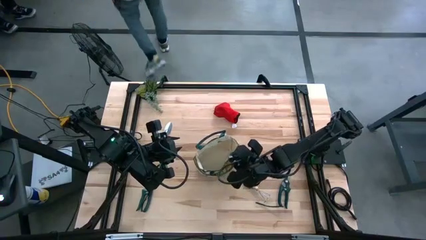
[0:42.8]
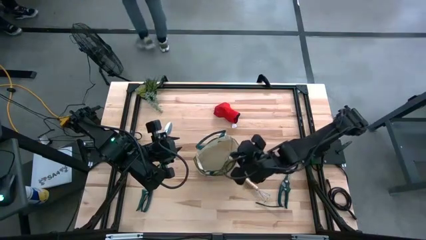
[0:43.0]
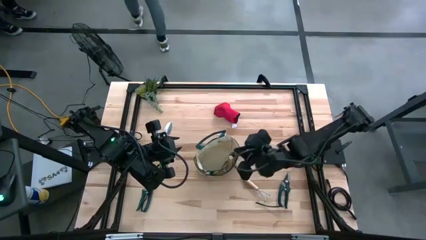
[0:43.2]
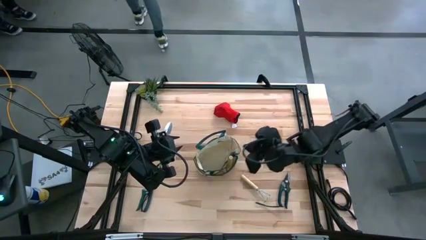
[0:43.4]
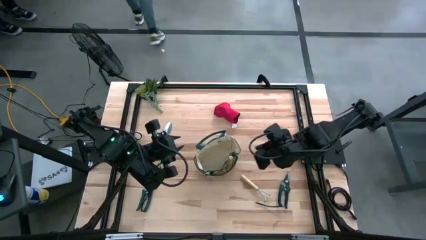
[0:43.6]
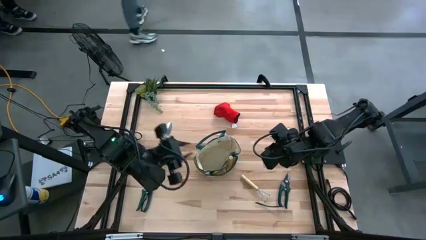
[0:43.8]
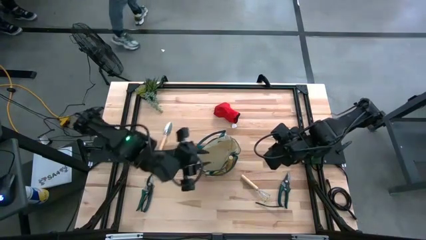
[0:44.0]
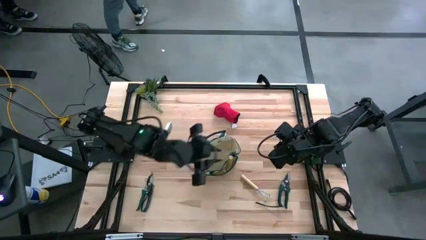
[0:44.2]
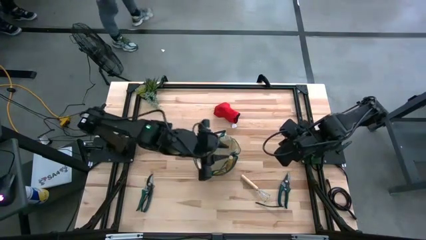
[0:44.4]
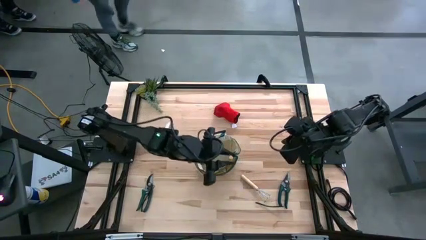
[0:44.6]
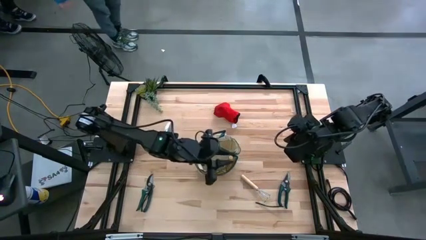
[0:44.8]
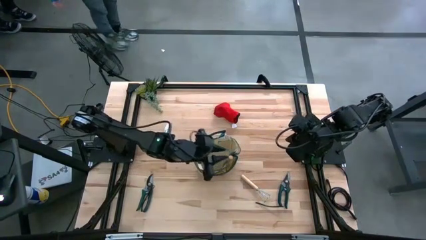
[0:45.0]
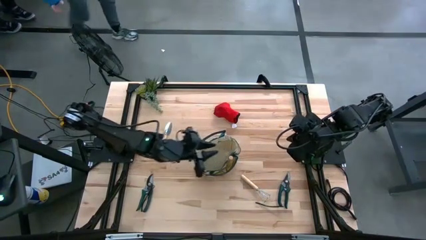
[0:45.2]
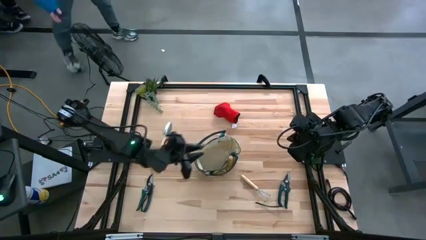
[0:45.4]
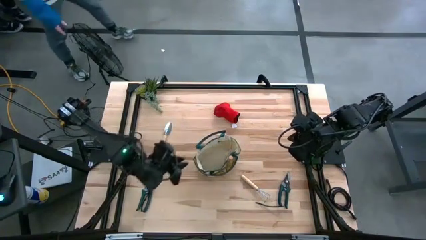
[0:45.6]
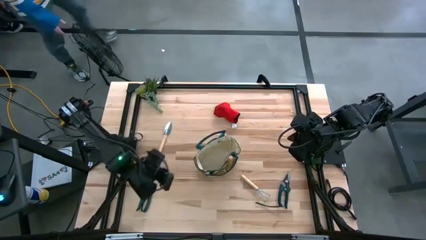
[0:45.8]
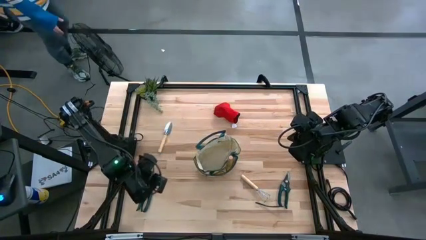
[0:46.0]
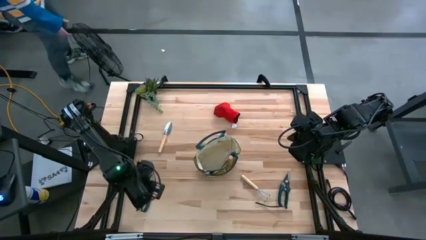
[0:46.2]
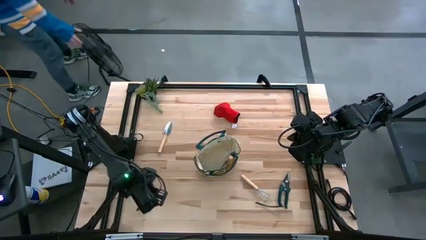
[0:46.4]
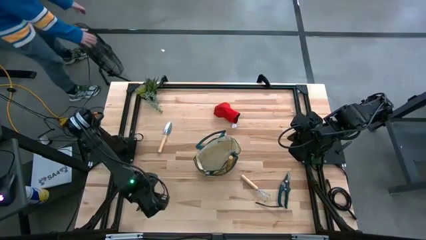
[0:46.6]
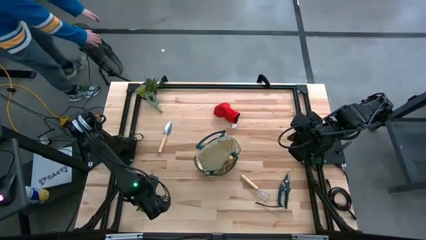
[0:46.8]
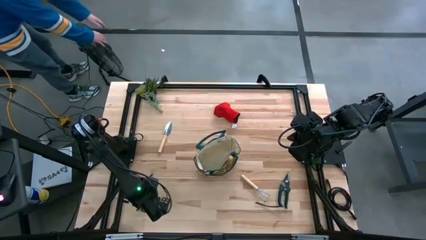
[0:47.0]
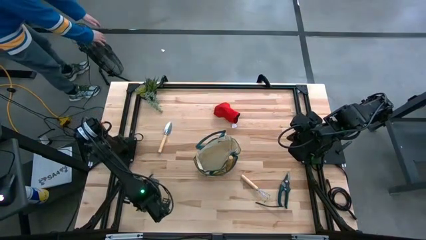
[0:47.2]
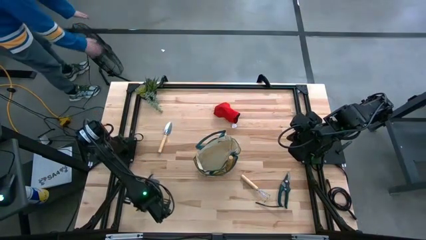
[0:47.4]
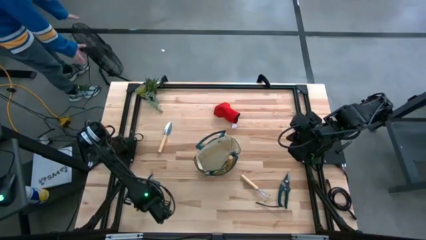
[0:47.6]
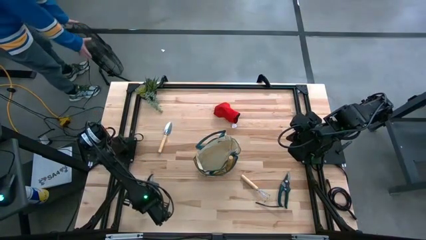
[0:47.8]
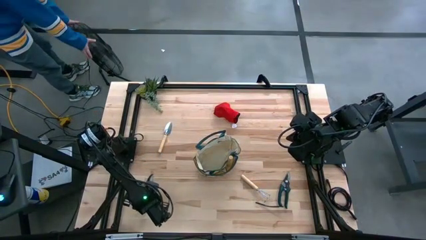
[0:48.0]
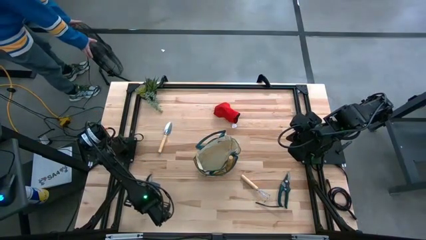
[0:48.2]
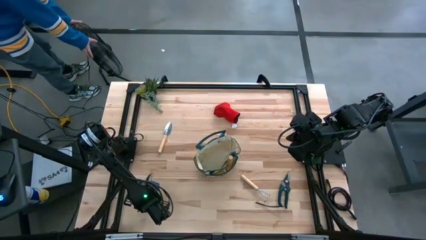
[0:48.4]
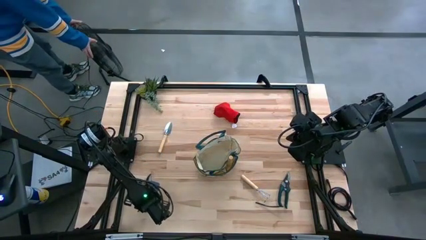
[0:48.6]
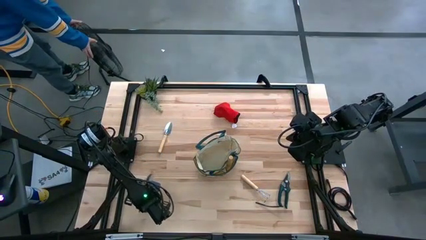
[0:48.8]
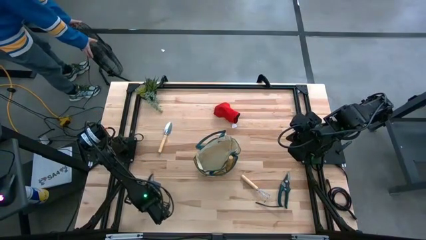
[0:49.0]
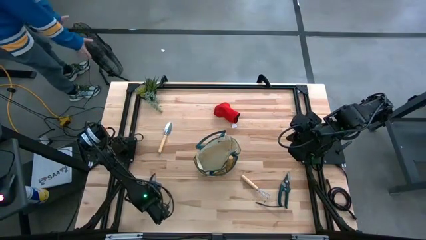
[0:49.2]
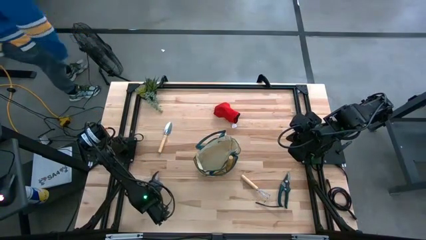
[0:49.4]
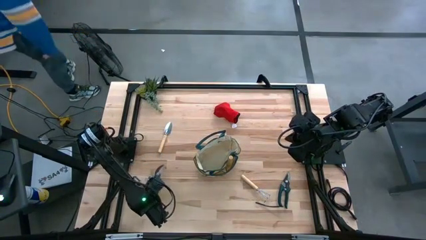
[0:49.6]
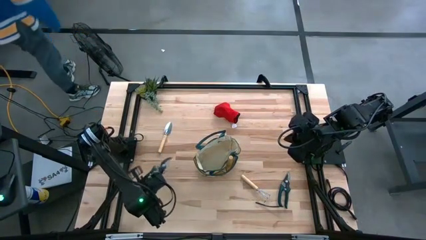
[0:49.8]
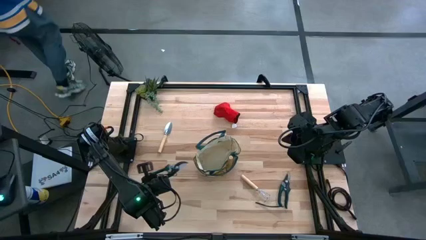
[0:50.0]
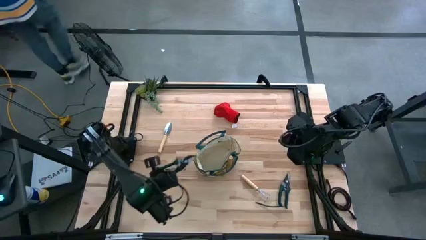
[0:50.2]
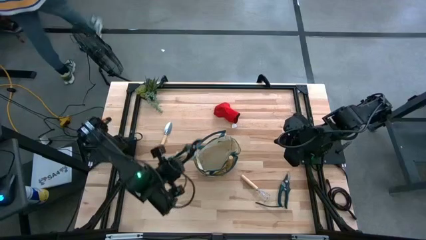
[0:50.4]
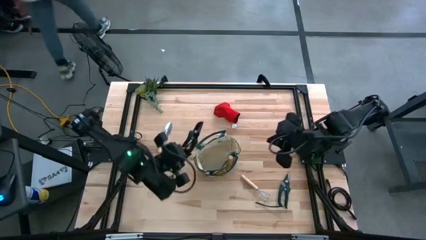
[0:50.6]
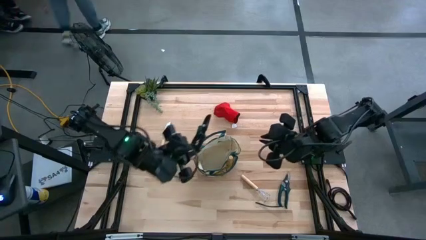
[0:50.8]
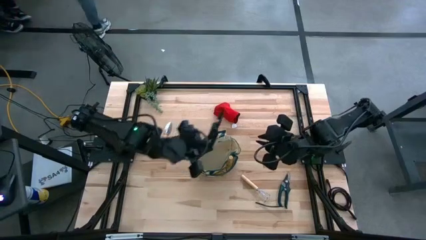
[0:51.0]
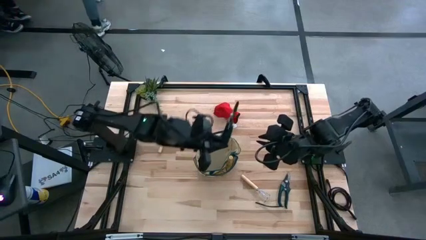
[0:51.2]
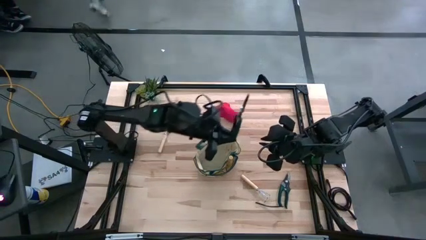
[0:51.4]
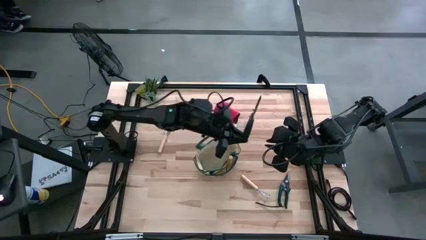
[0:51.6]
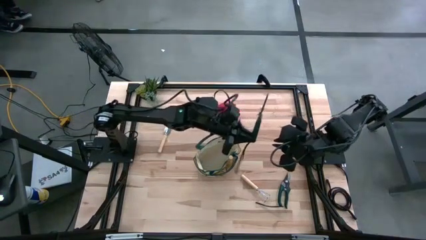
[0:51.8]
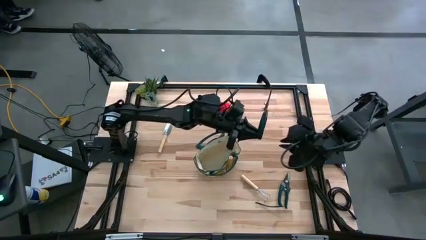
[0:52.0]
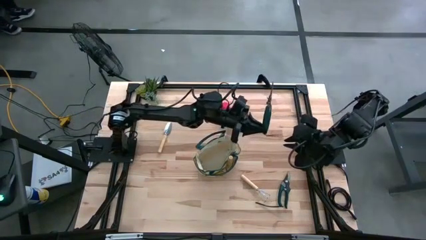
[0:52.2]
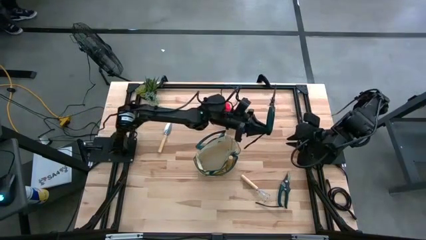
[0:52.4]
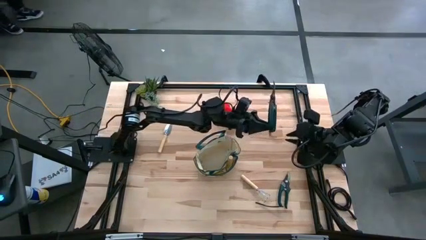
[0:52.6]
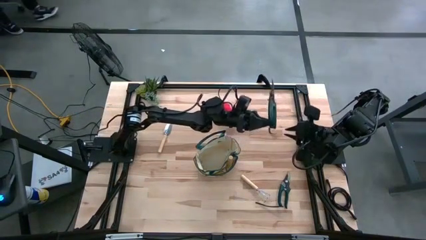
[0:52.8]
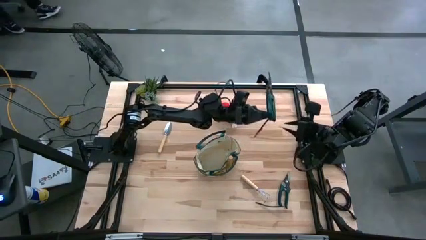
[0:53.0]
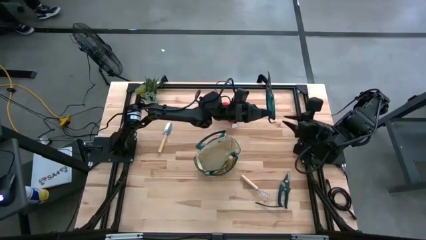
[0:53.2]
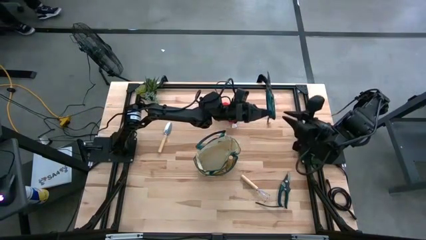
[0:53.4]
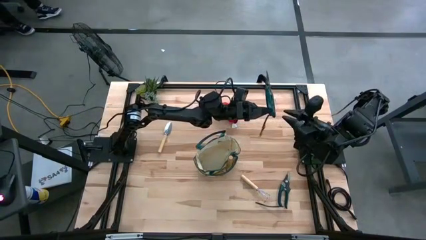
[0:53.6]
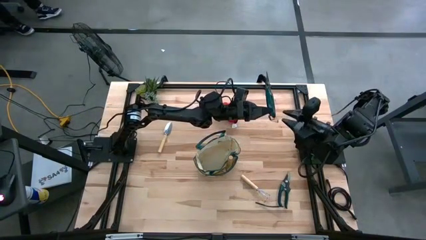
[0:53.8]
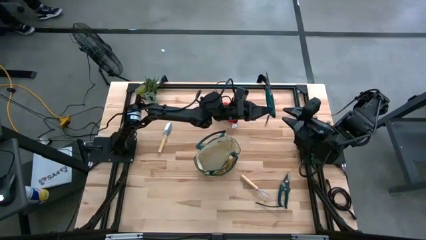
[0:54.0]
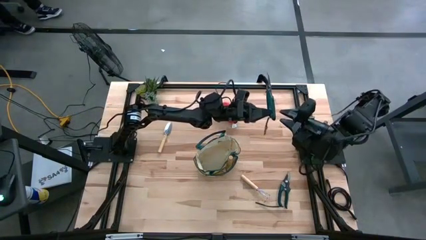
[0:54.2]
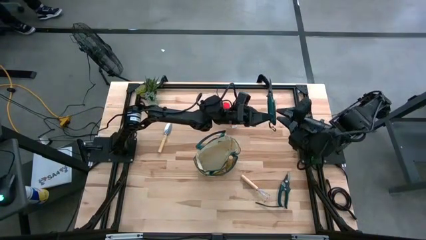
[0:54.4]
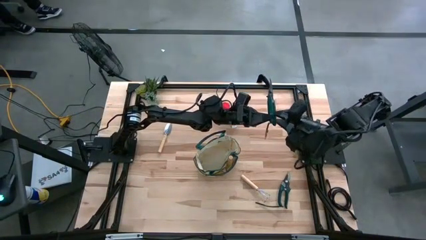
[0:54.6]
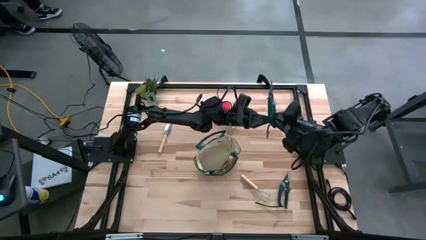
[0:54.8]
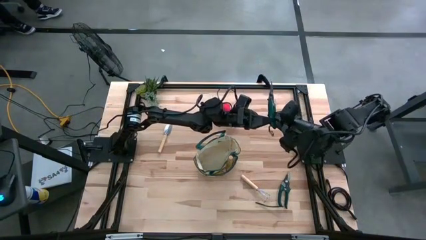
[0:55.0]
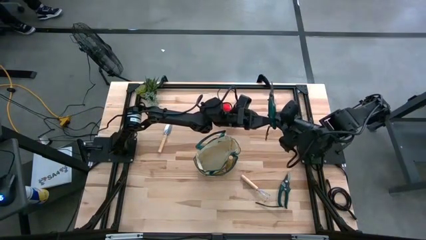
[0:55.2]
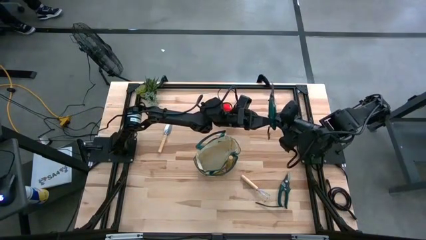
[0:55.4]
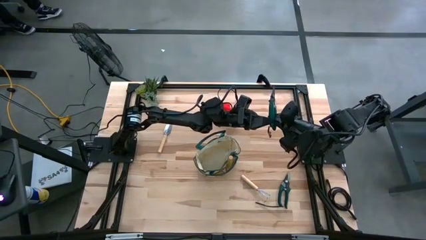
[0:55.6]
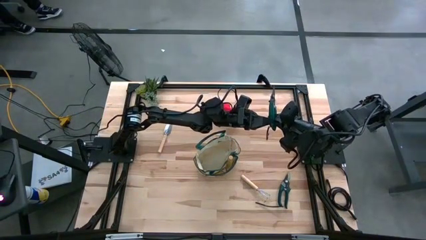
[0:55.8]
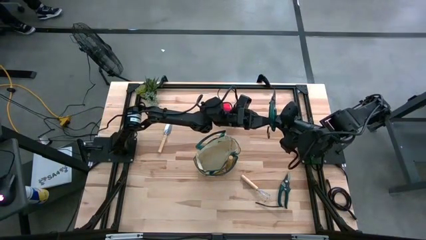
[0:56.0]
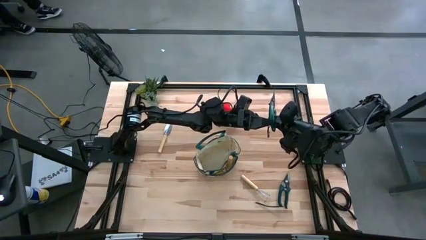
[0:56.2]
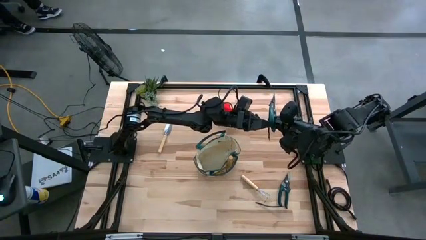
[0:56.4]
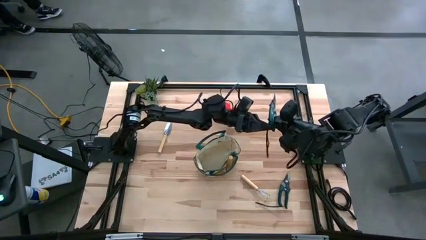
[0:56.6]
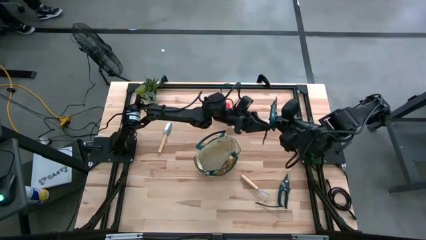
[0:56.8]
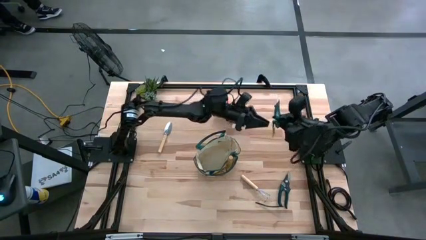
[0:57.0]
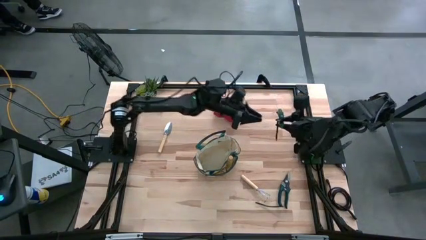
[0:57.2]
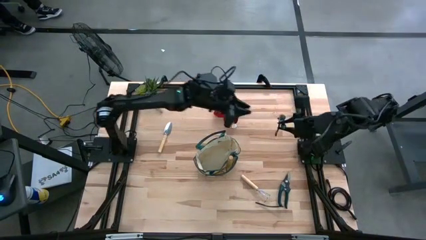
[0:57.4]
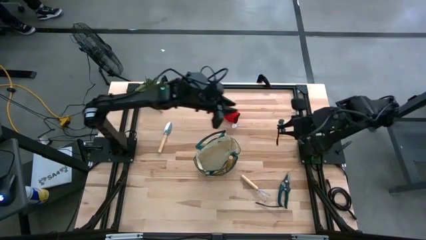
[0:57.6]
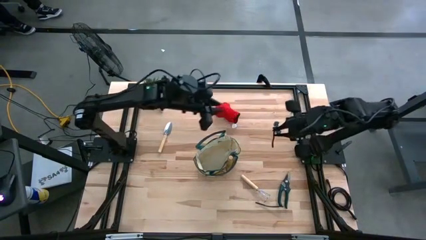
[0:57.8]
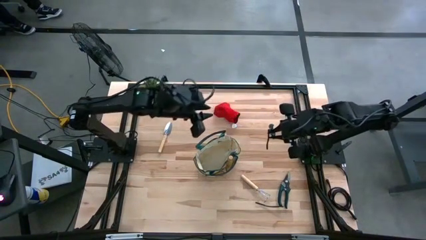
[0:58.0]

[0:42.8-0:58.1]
Task: Pick & Place Garden tools in Gardening bag
Put the left green shear scissors into the white gardening bag
